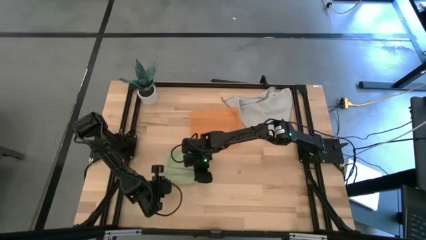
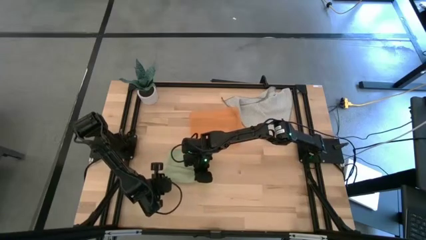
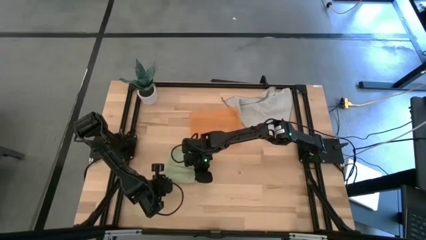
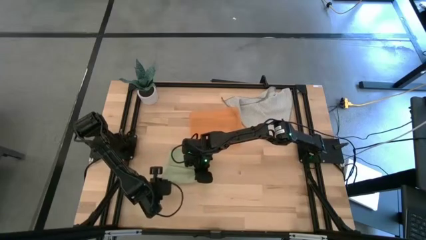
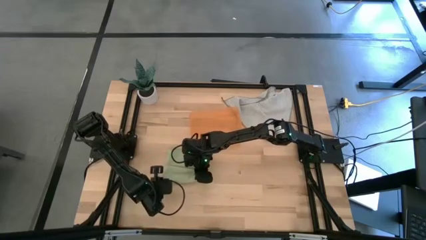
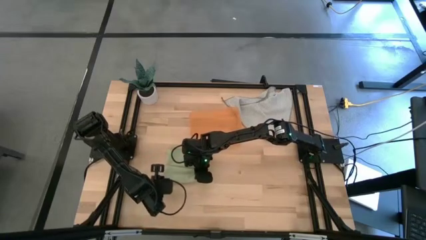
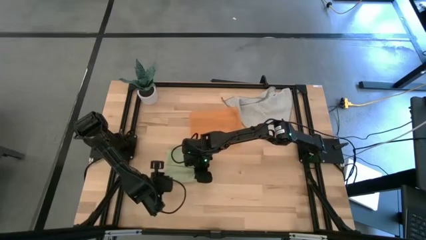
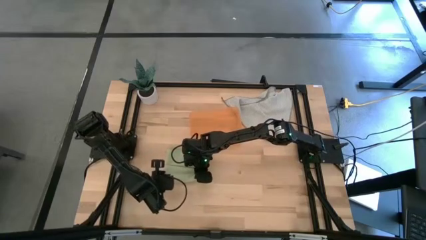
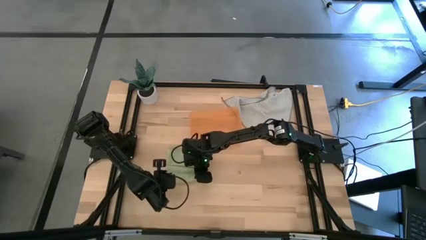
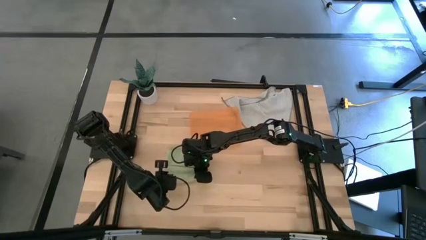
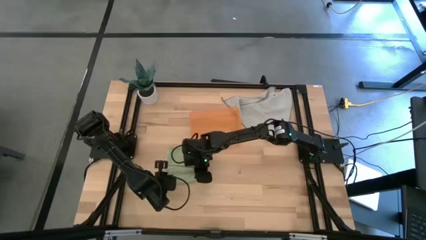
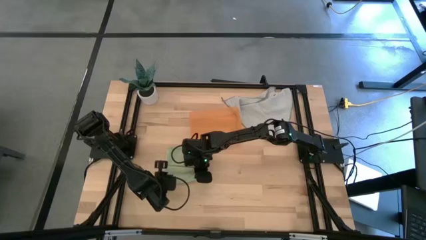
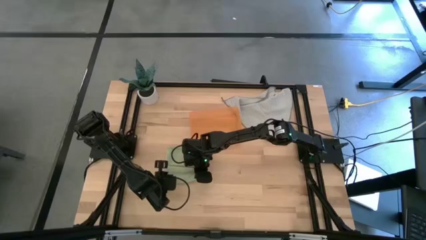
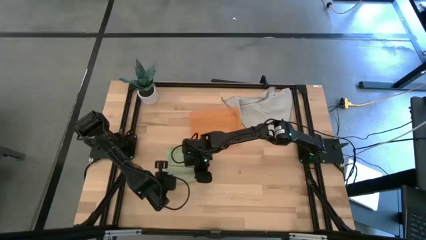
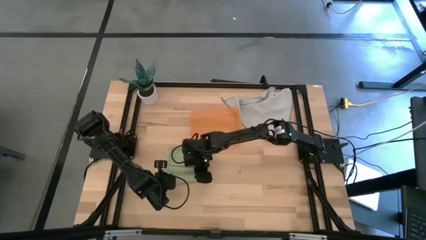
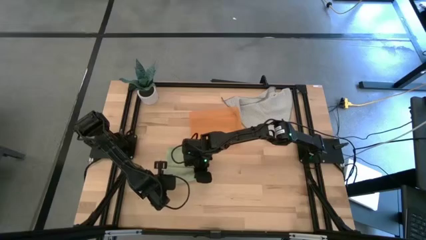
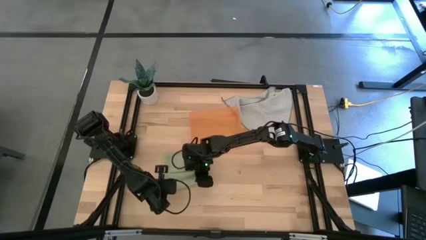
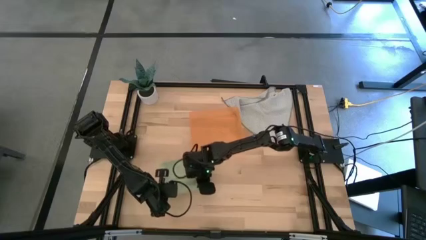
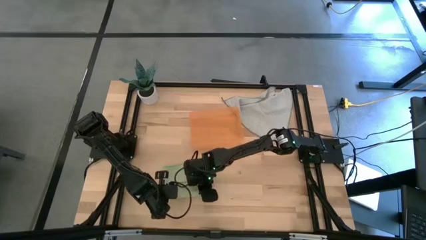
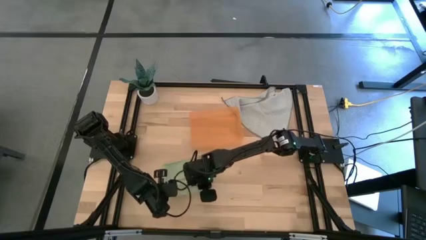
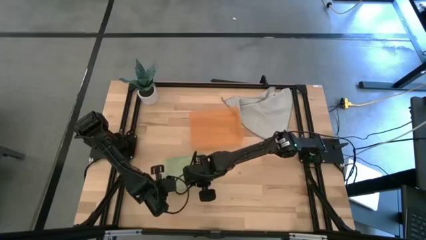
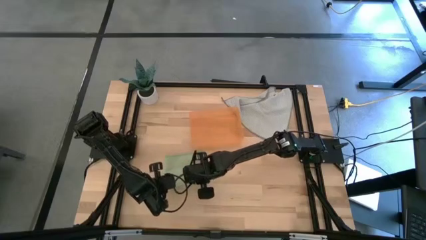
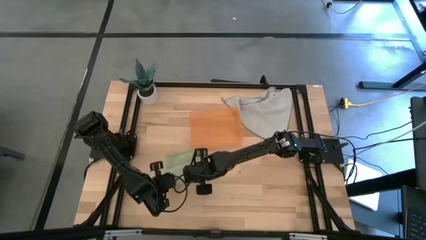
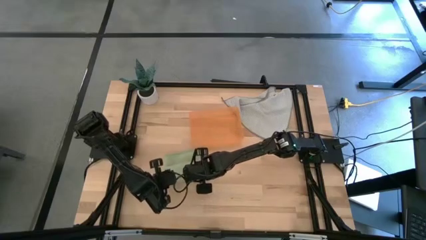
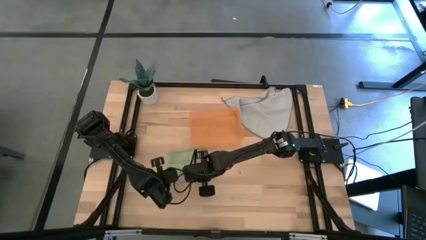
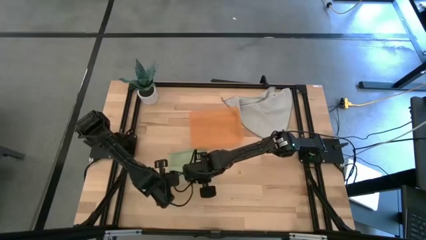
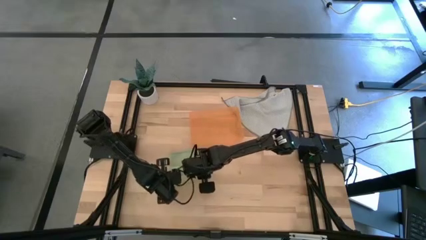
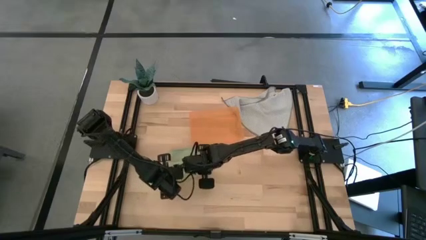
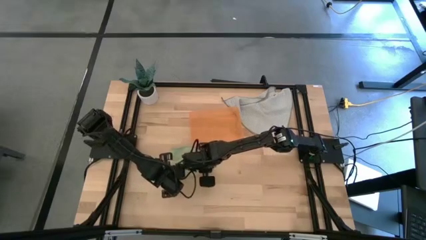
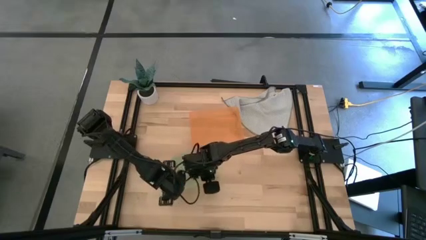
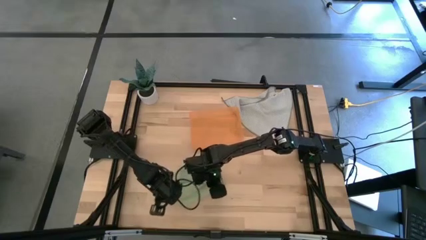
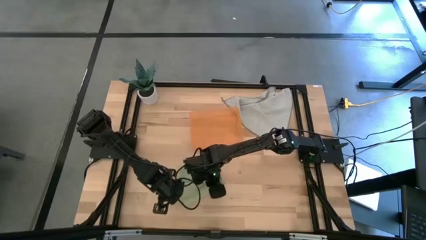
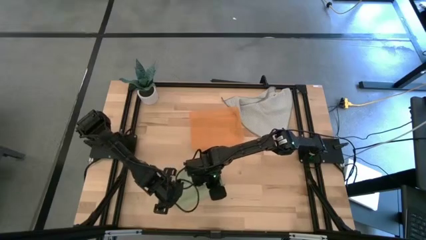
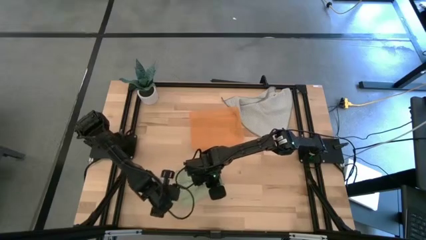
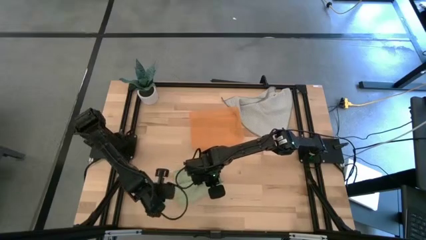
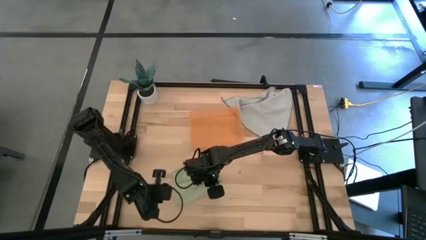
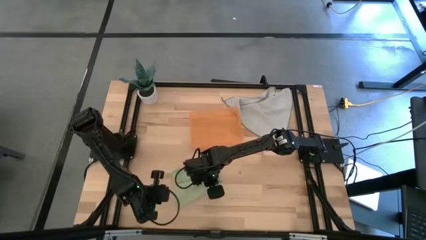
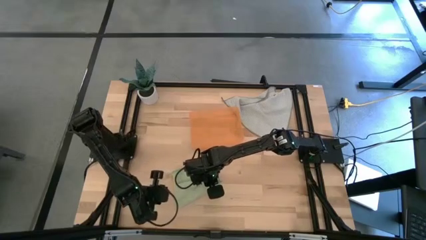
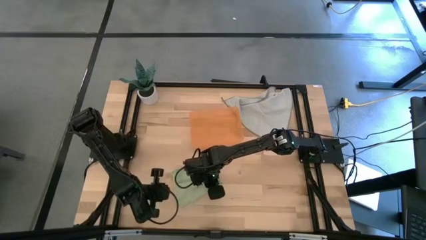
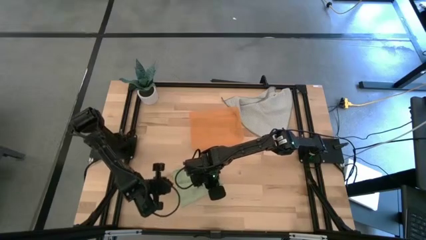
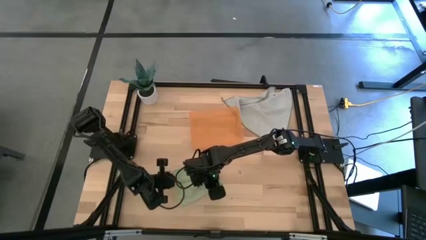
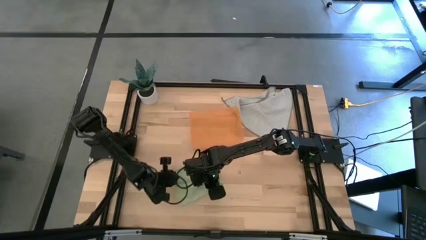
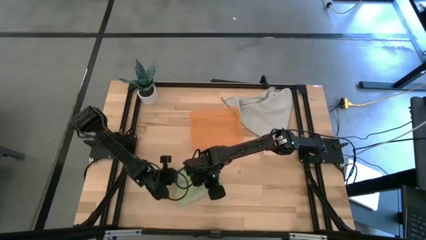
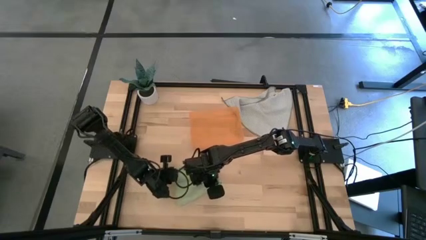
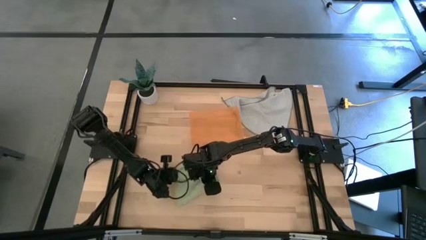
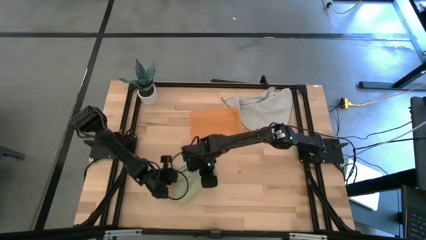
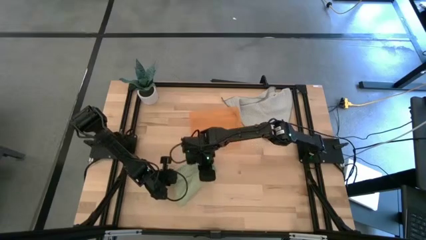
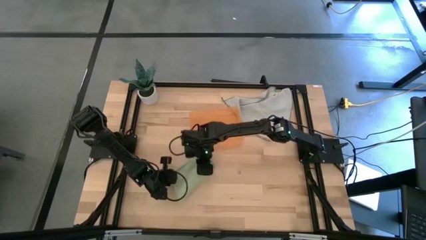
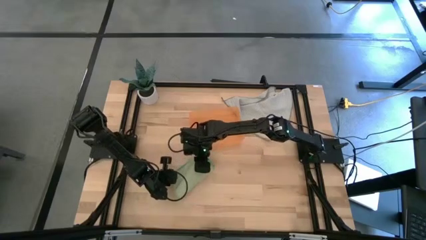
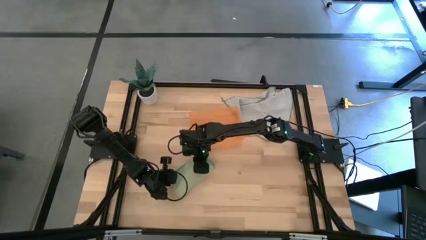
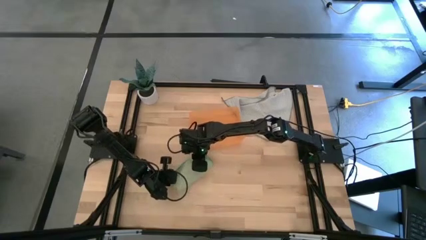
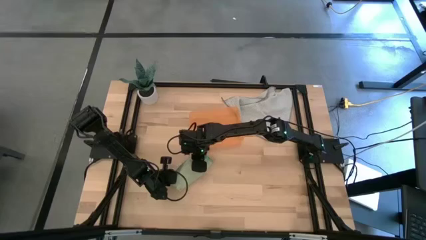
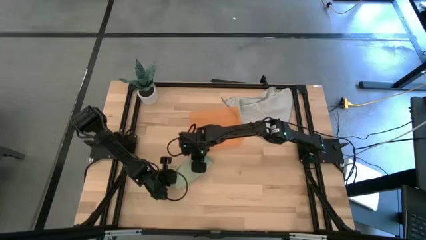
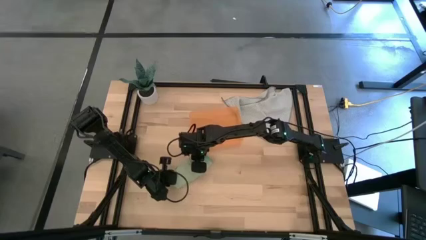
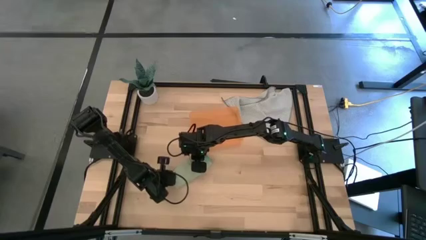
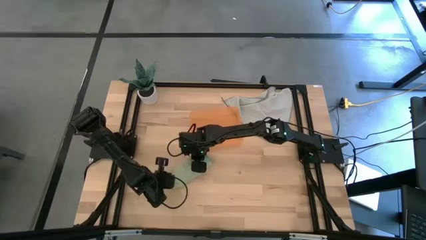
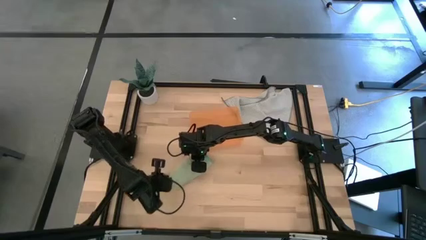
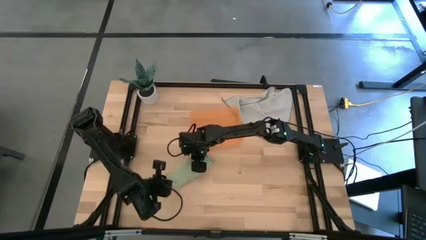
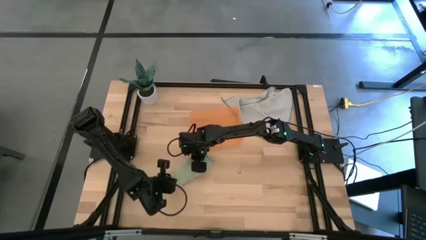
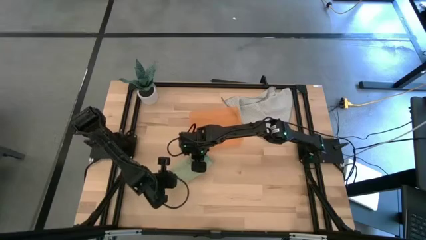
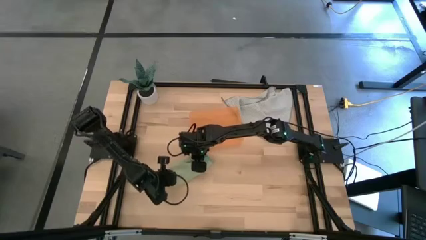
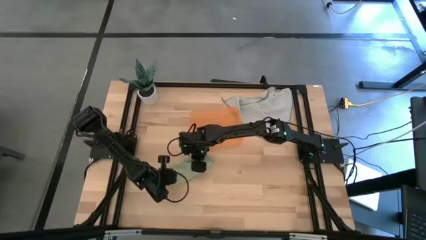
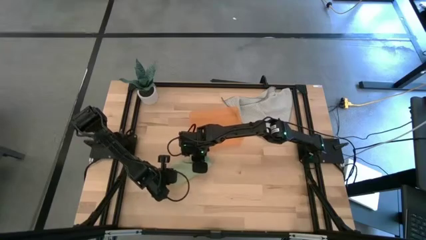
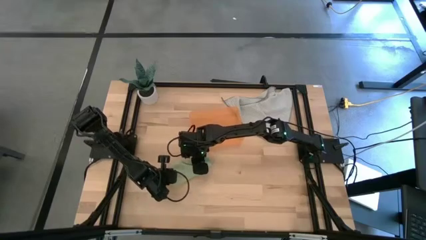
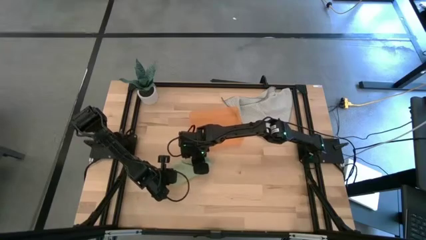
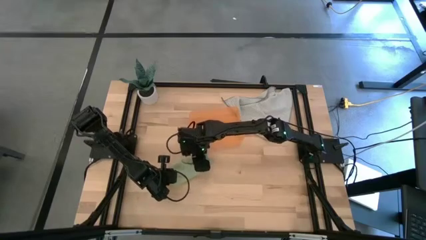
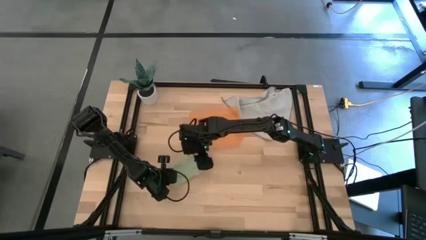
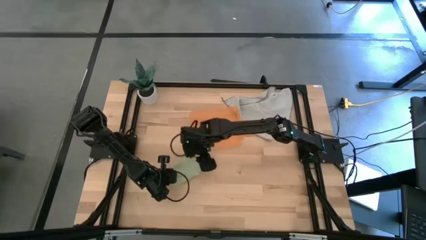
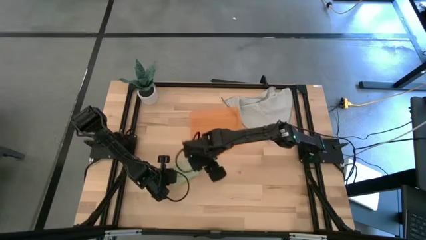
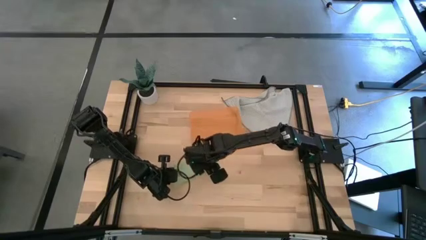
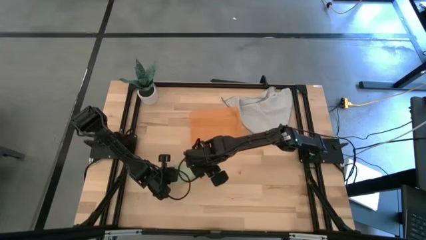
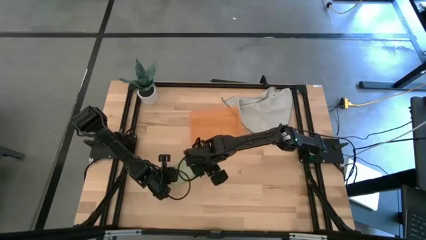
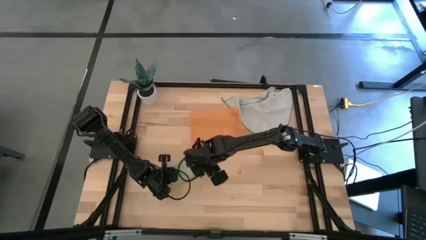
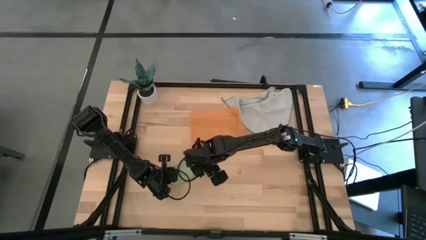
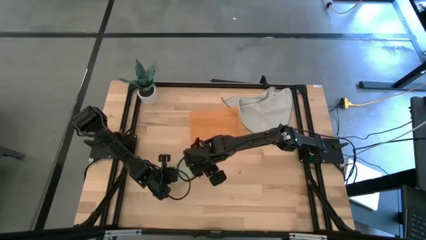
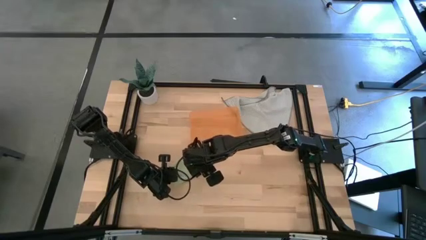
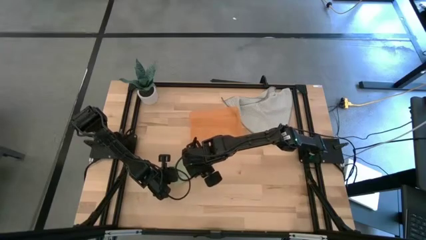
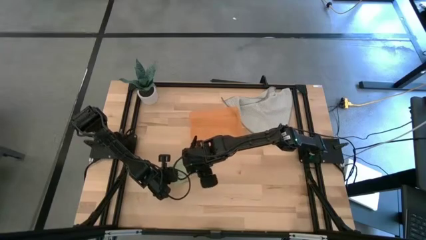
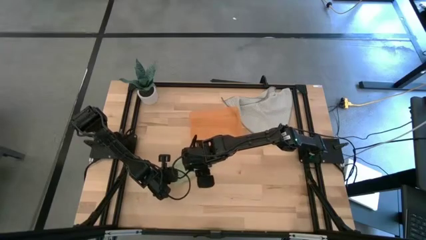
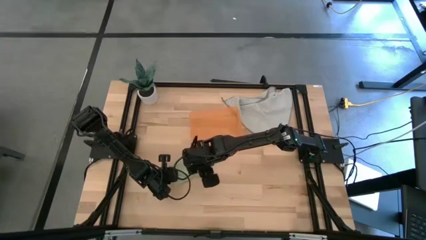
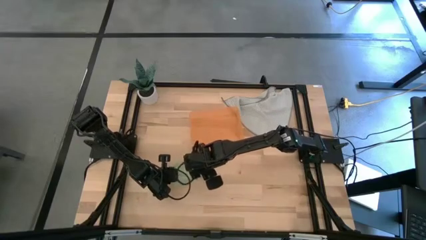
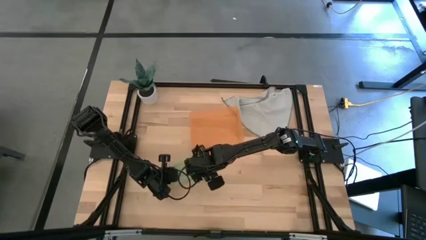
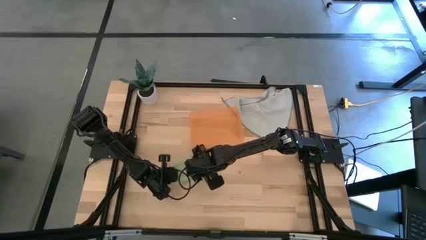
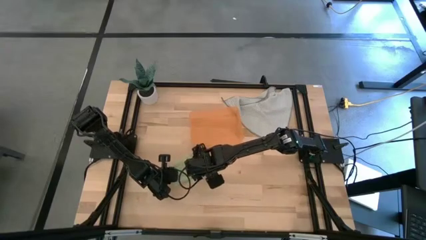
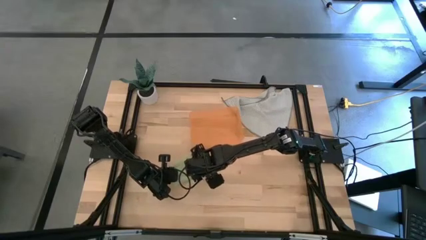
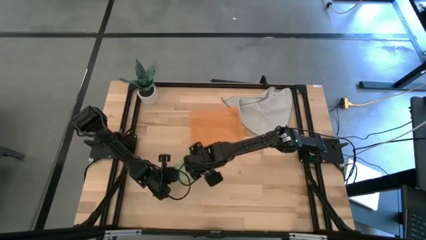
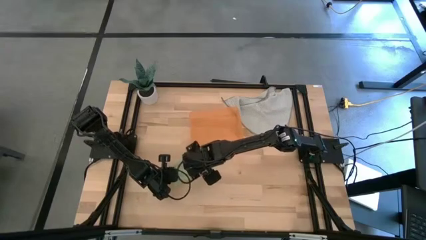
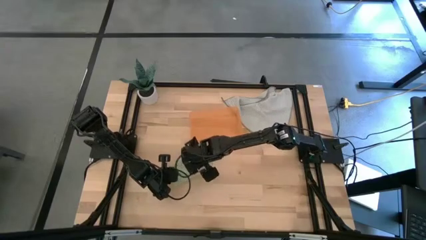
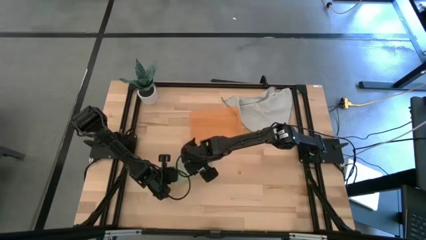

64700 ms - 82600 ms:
Task: Roll microfiber towels into tight, uniform cylinder then place into a basket
Roll the green microfiber towel
